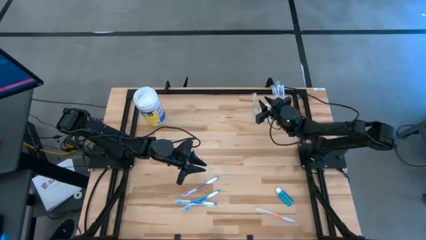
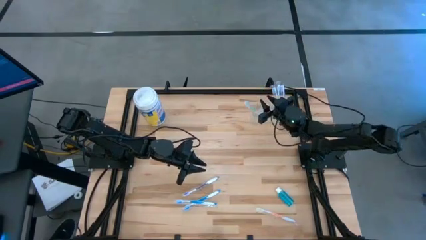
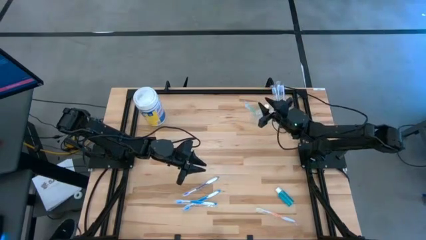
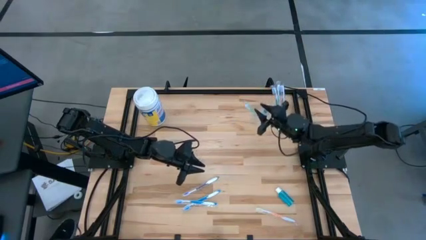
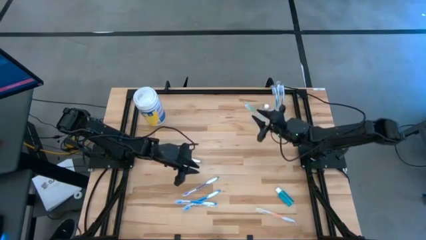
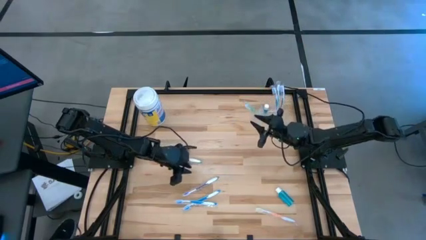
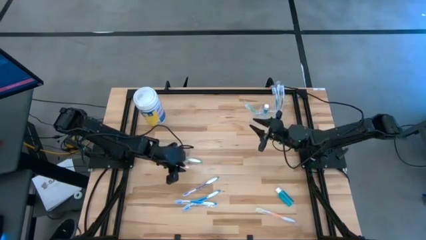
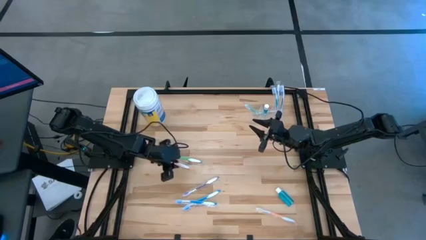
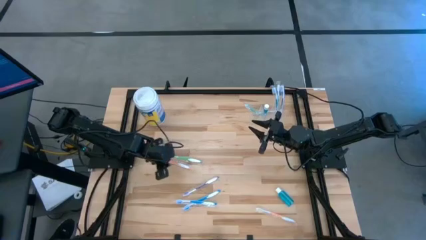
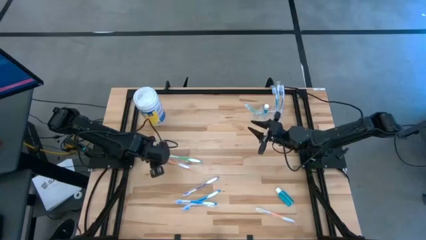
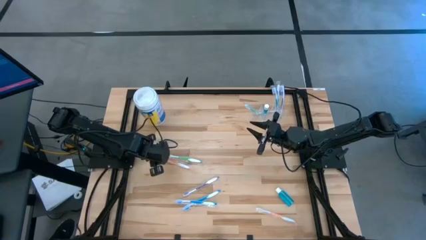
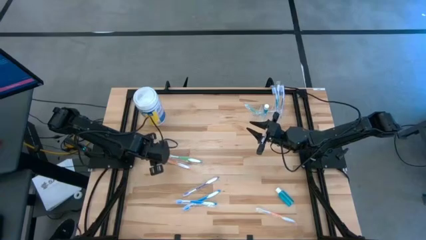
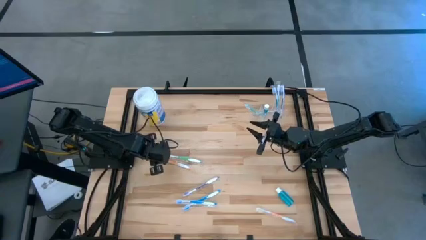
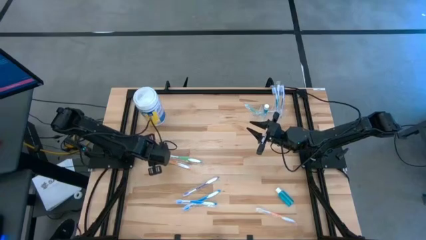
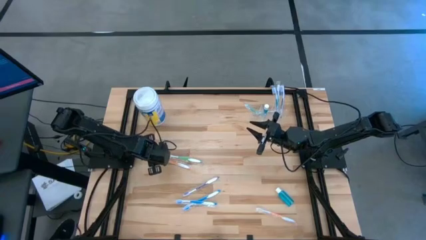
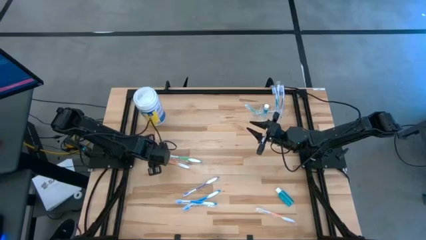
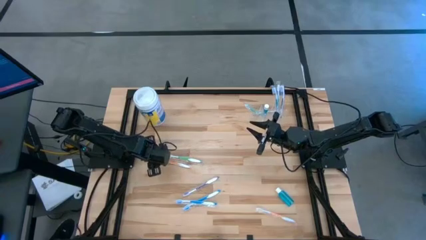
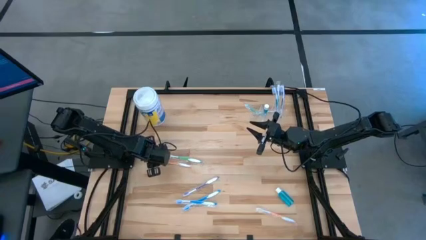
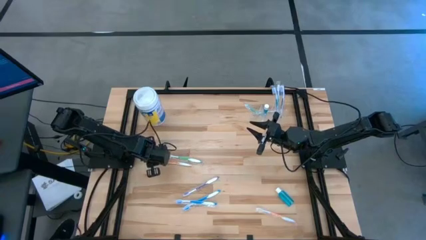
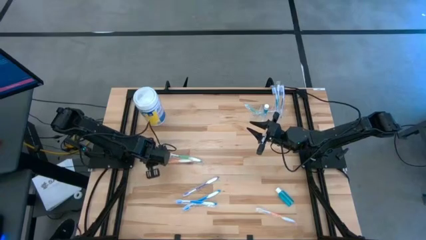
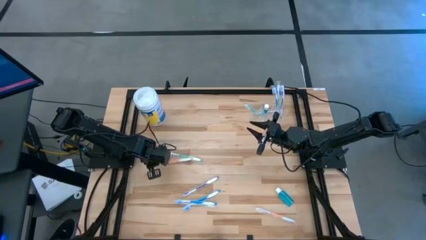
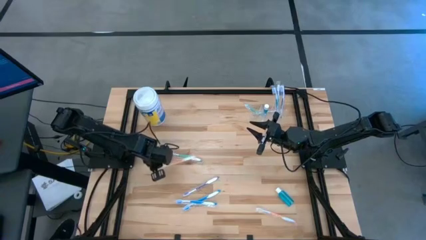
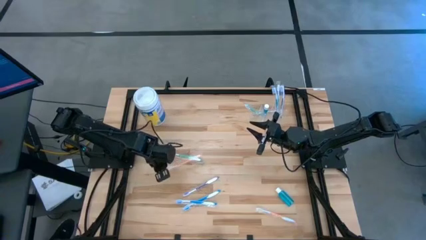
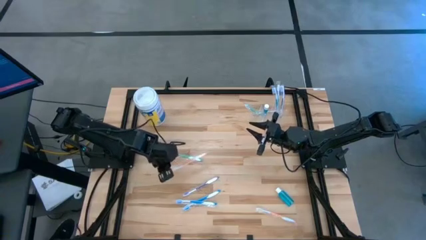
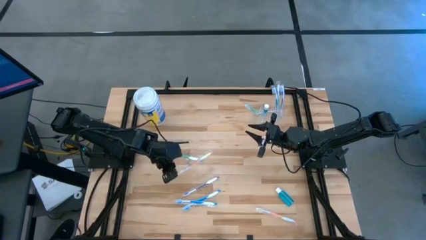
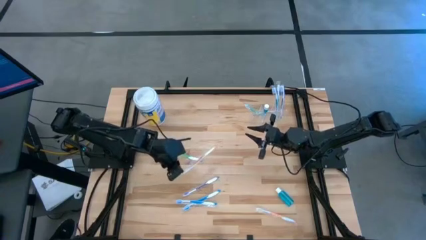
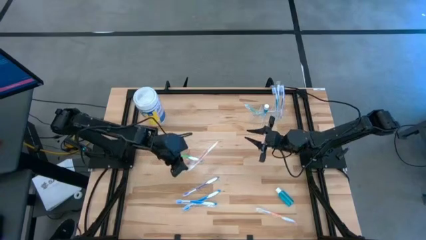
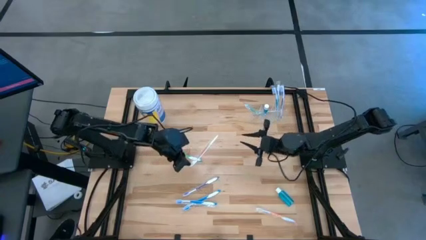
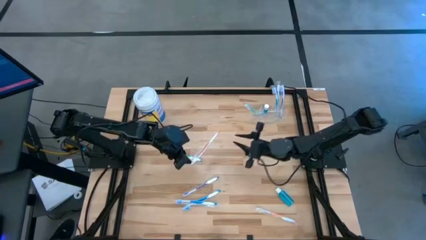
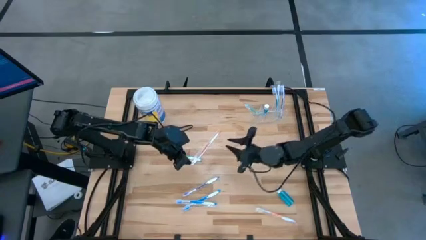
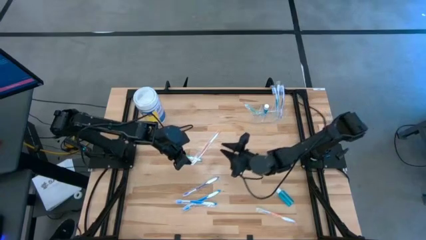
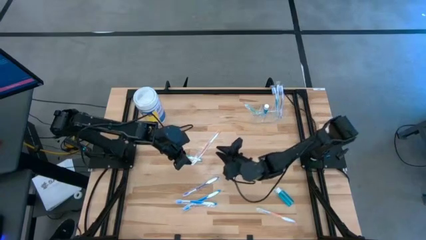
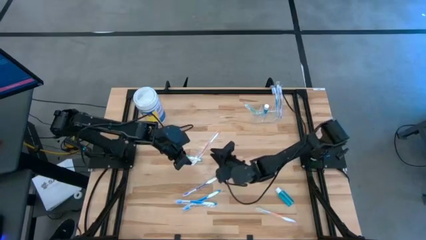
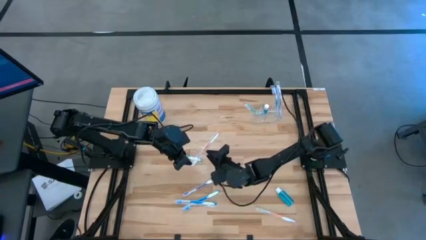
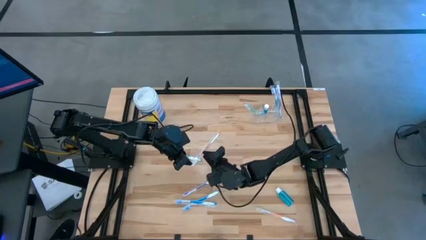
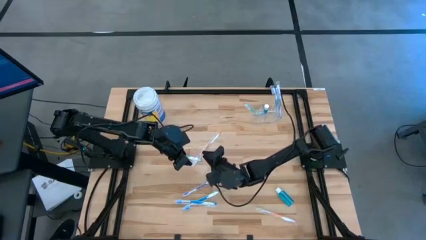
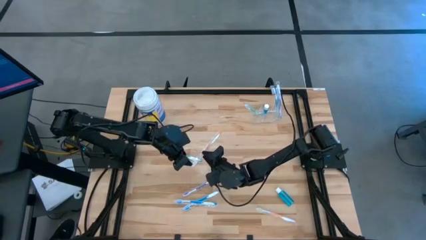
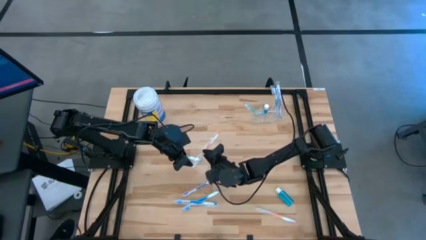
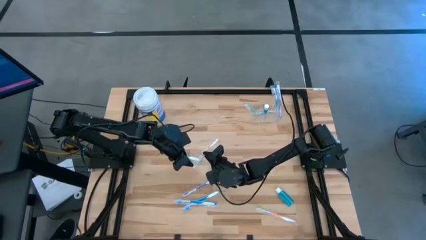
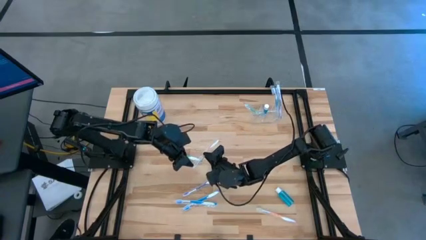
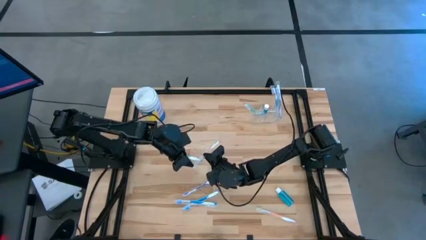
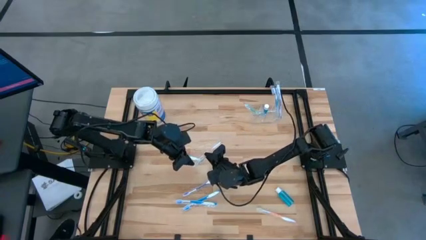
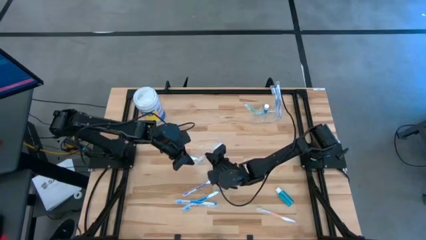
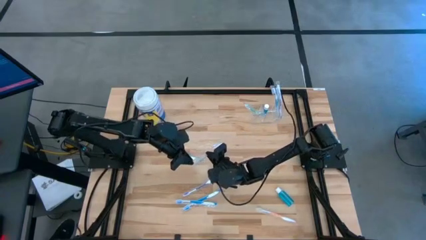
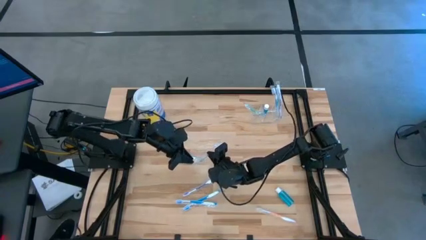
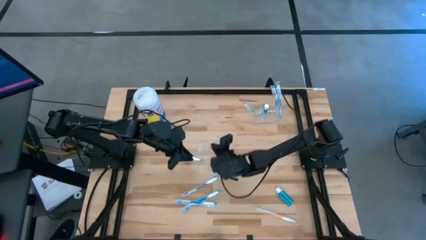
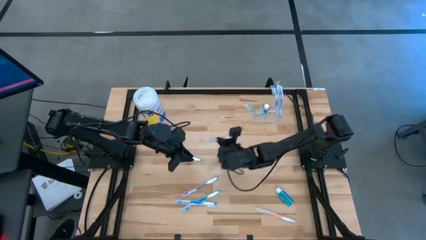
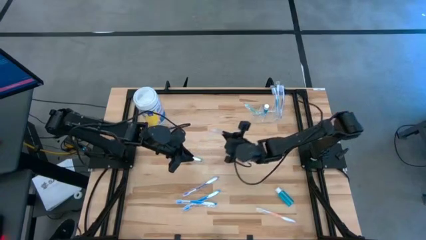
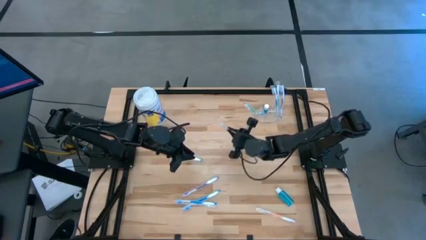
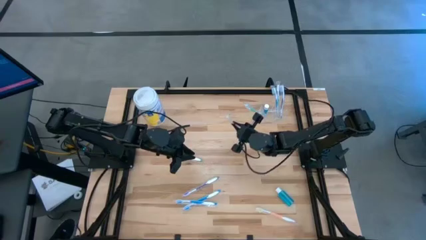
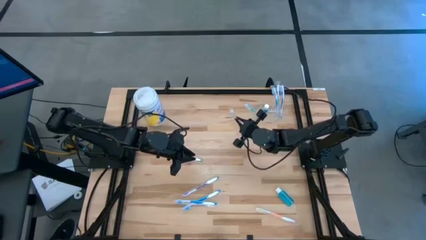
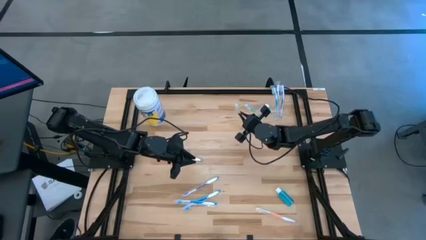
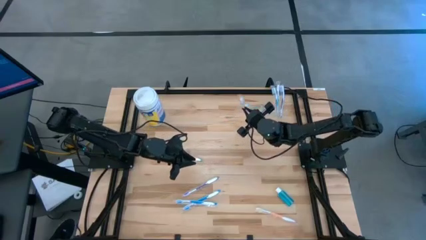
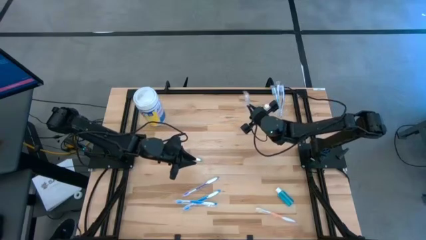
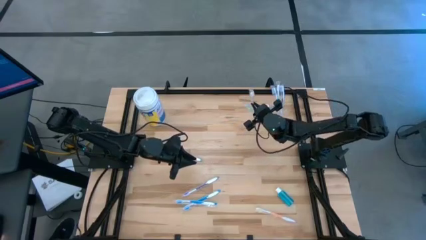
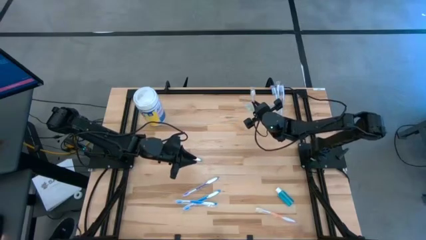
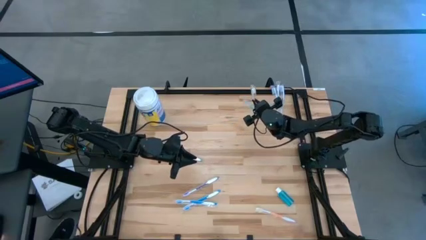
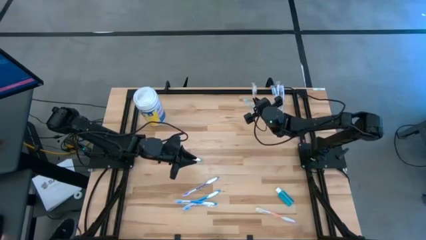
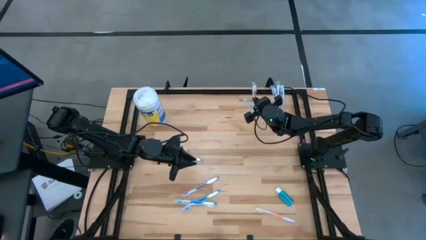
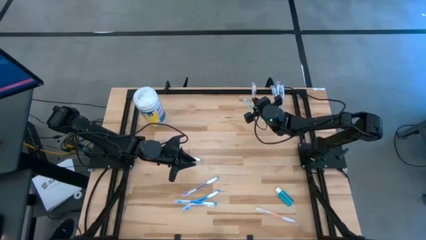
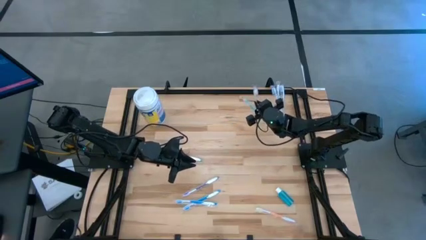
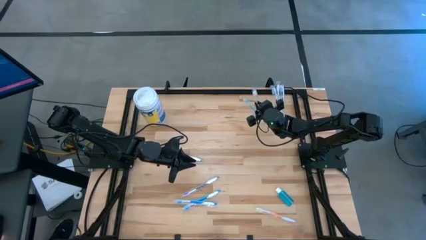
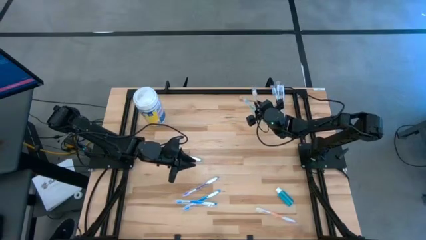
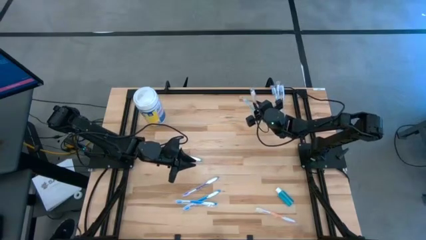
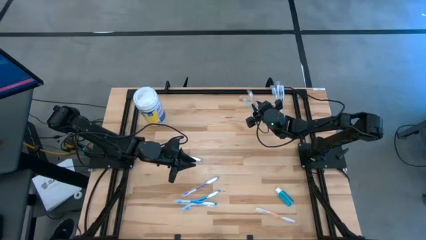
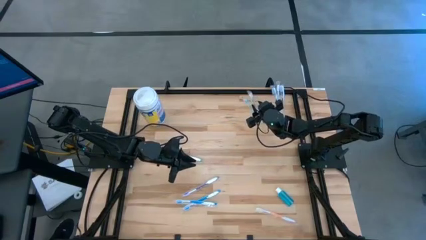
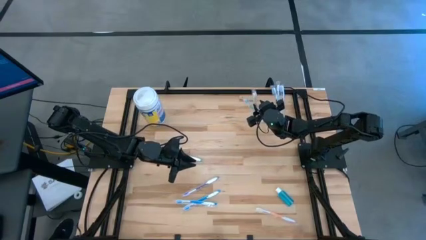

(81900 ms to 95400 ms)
Task: Pick & Place toothbrushing station
Put the left orange toothbrush into the left transparent organizer

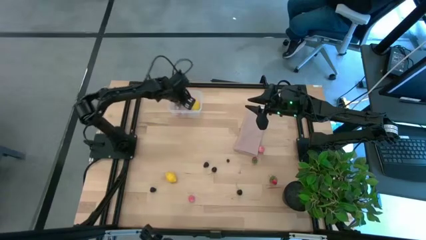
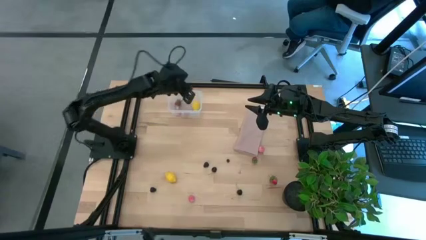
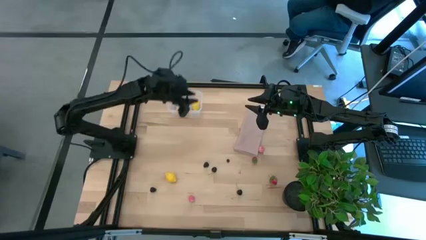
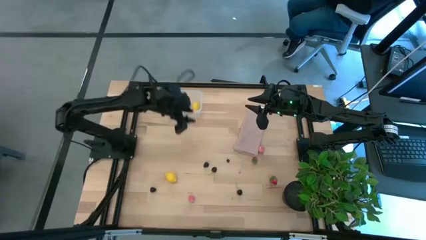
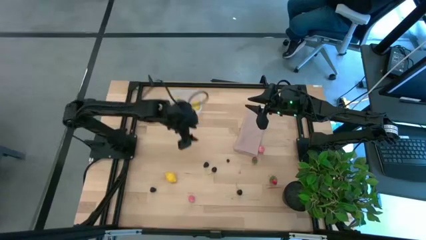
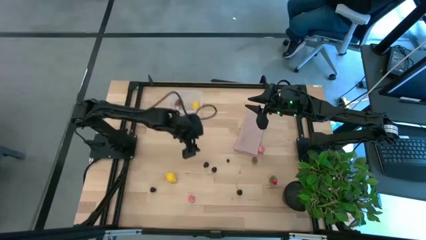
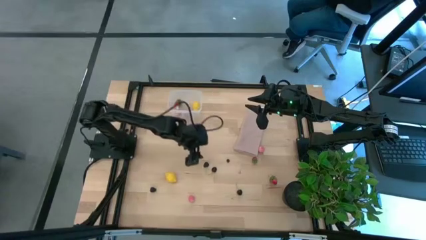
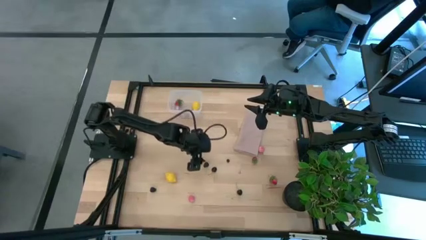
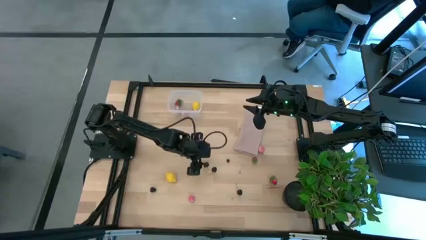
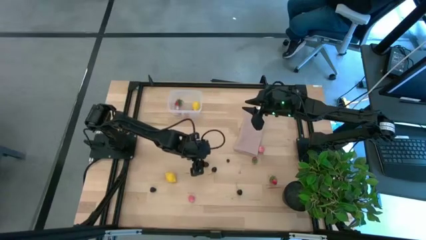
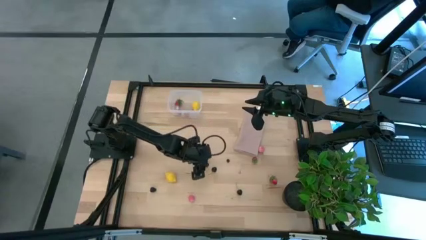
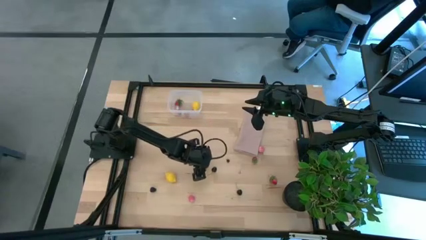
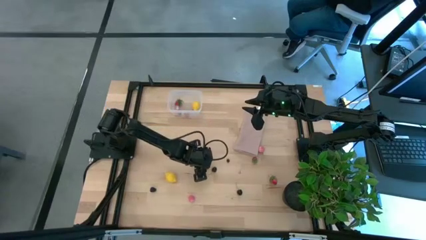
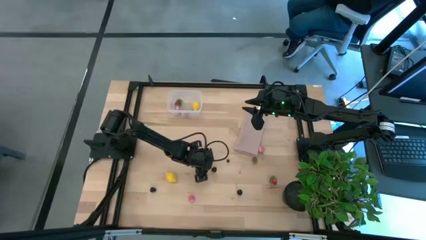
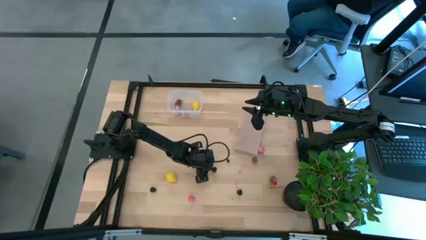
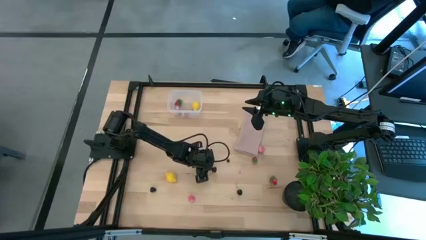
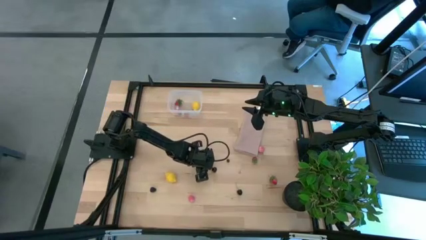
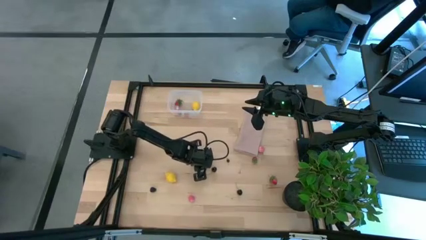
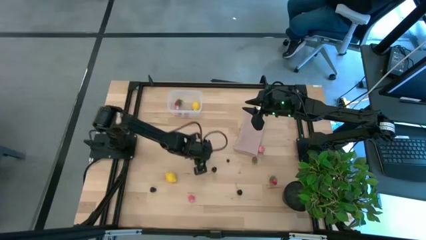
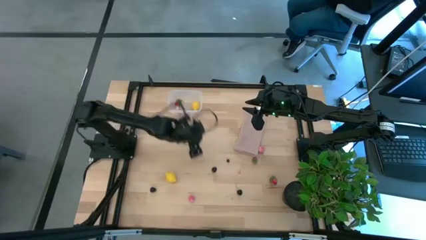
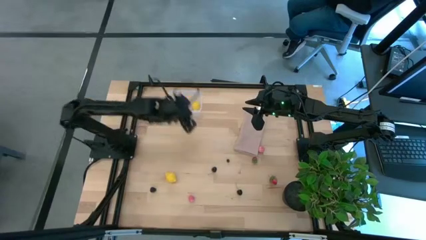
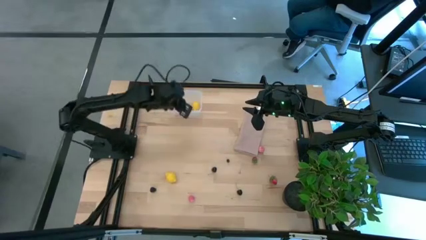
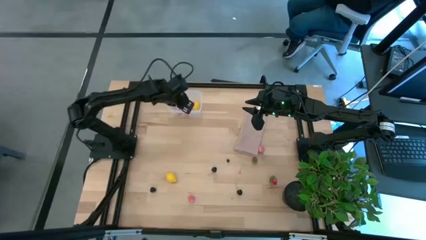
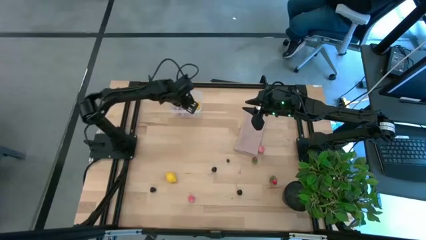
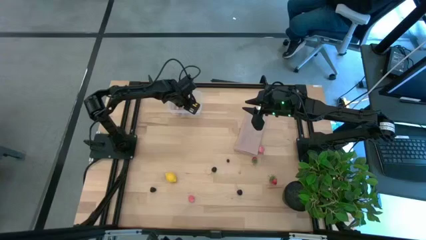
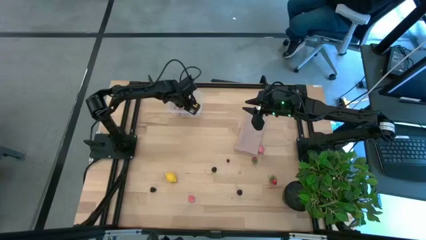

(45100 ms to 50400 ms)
Task: Pick and placing Produce into tupperware
Put the blackberry into the transparent bin
